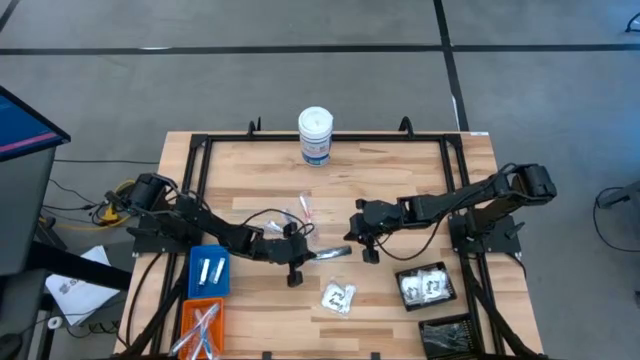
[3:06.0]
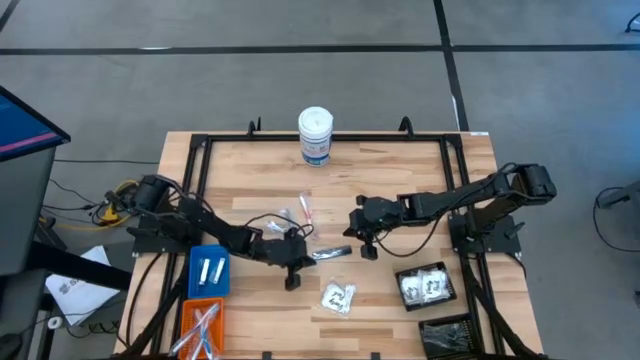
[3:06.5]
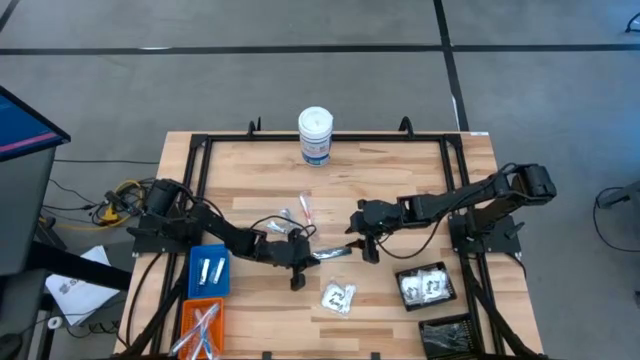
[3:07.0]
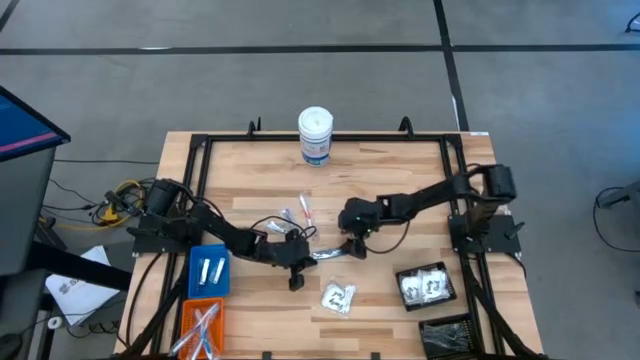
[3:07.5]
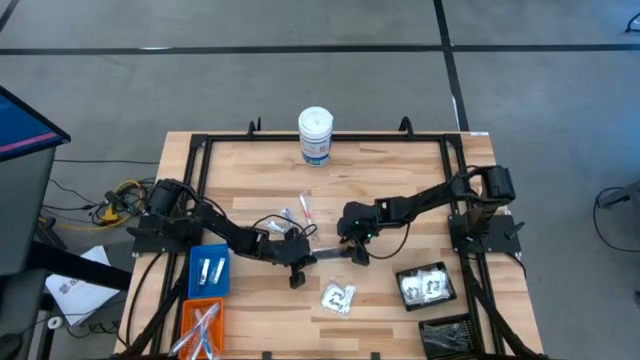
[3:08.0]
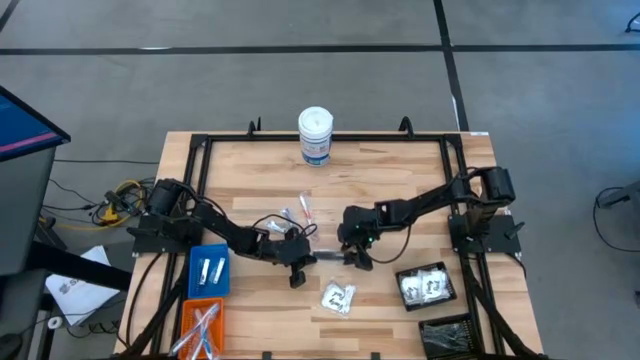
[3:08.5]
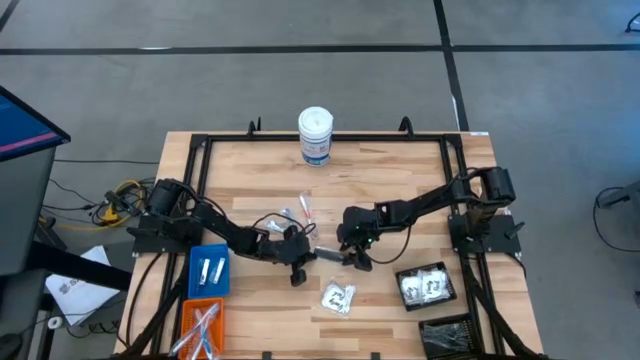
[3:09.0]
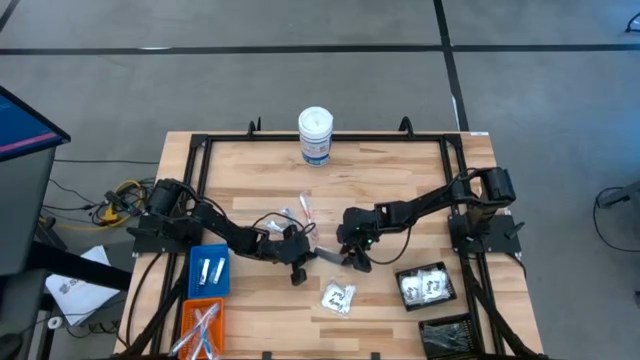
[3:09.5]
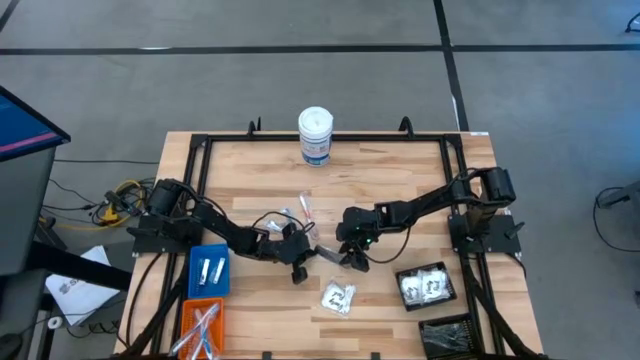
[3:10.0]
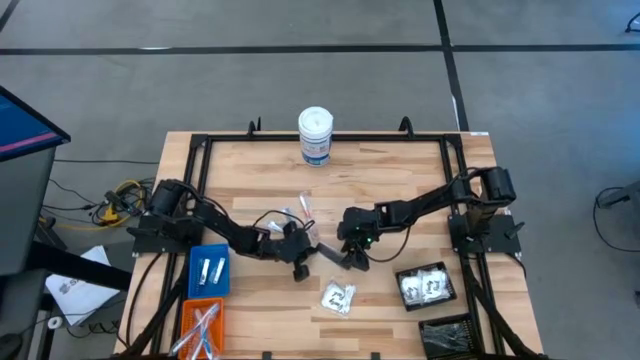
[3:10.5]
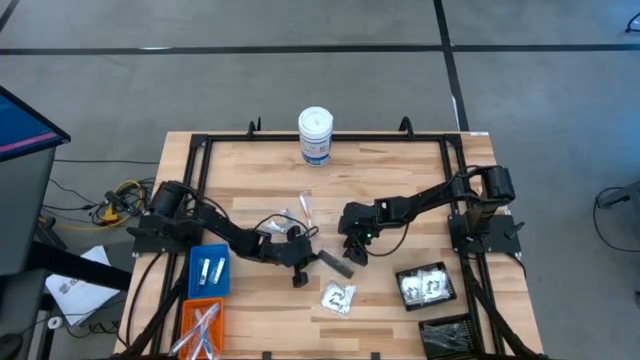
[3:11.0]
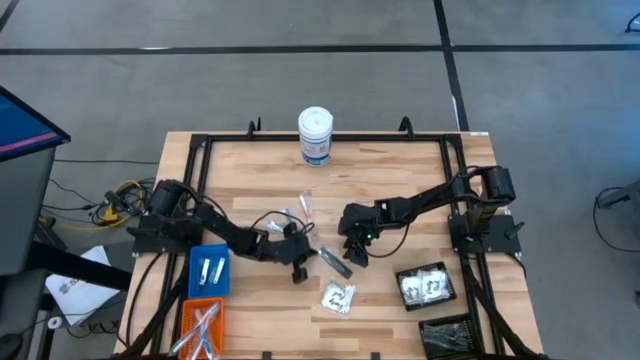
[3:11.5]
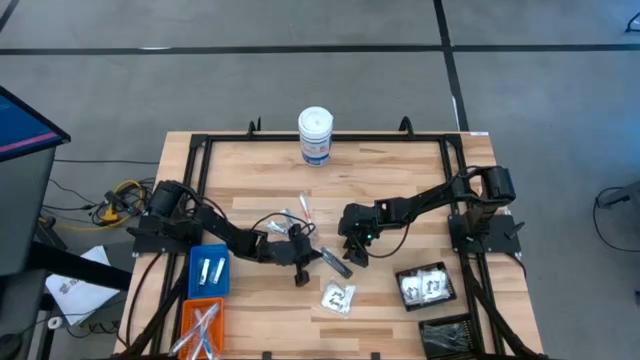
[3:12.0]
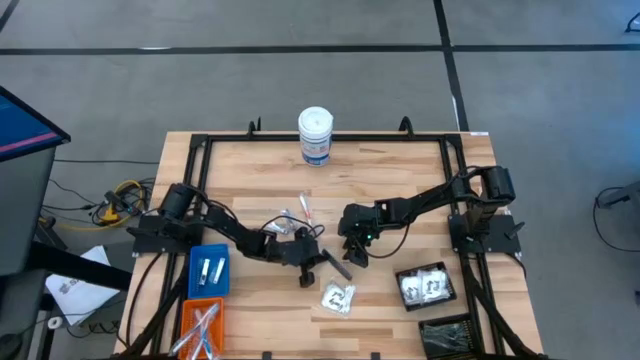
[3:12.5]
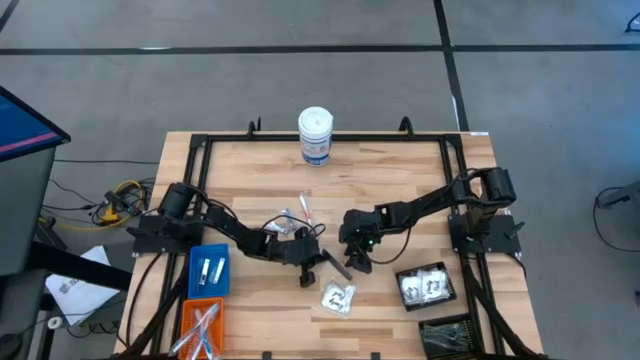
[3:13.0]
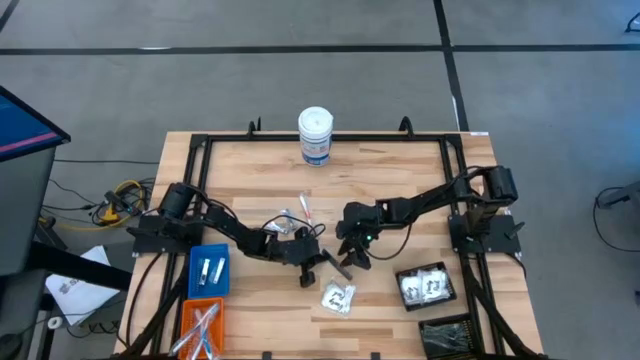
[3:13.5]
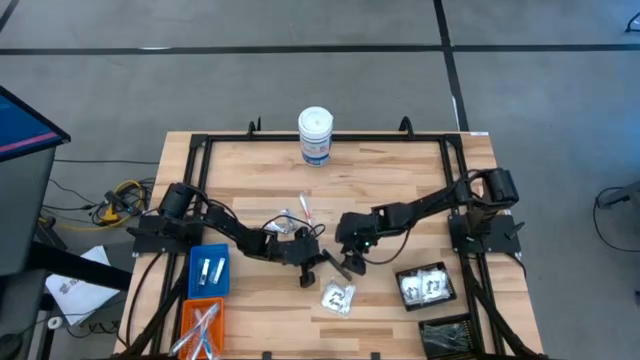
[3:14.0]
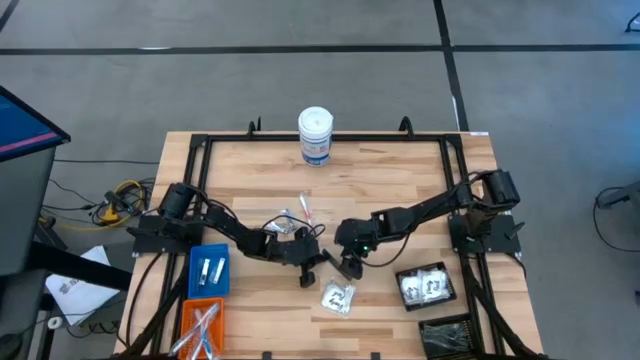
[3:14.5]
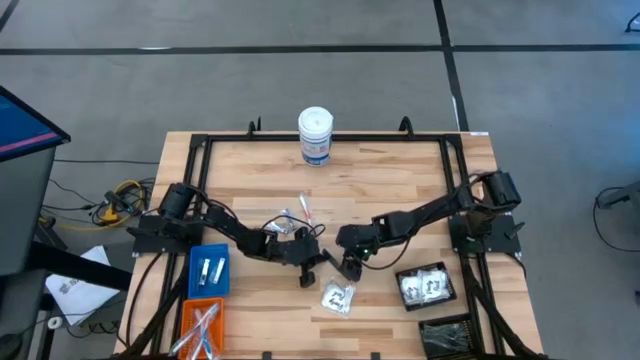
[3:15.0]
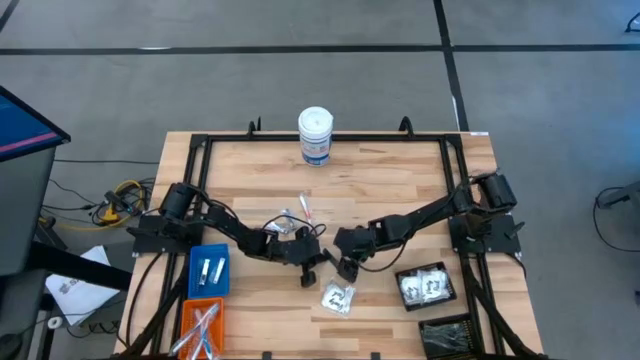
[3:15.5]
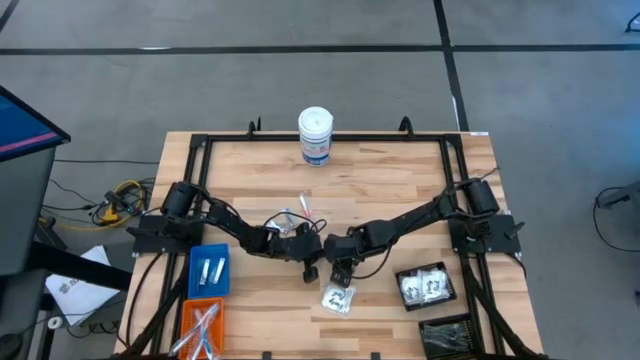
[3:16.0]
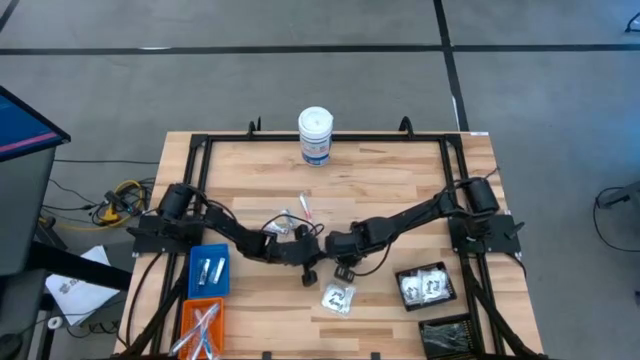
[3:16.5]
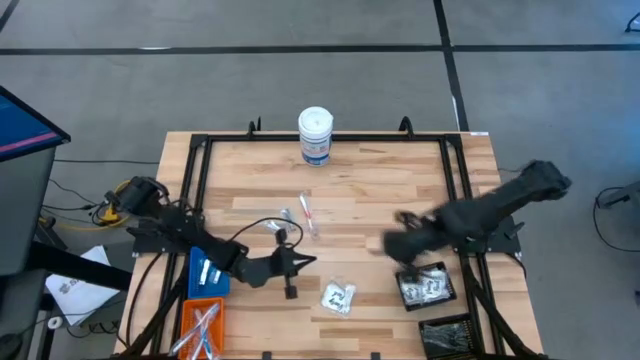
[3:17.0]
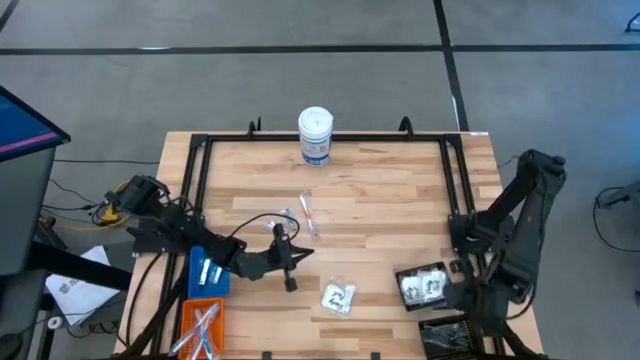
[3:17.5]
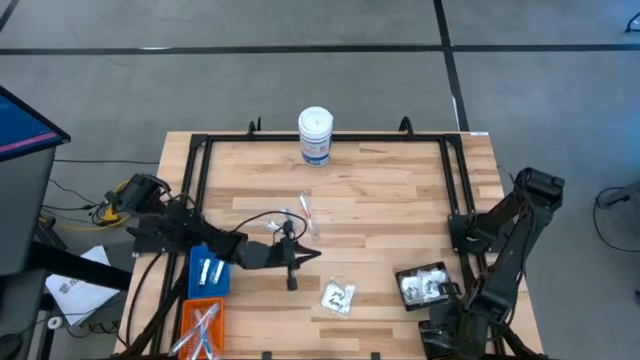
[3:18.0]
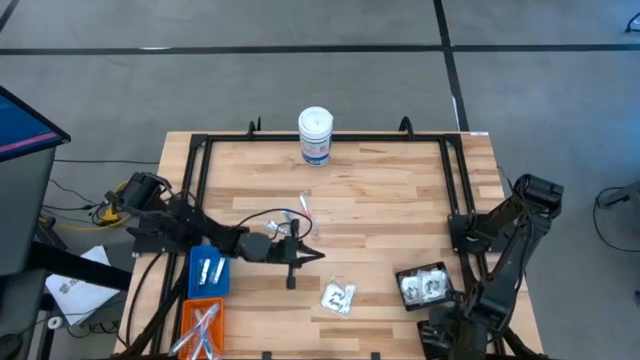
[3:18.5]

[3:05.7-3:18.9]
Task: Pick & Place Travel size toiletries
Put the black comb into the bottom black bin

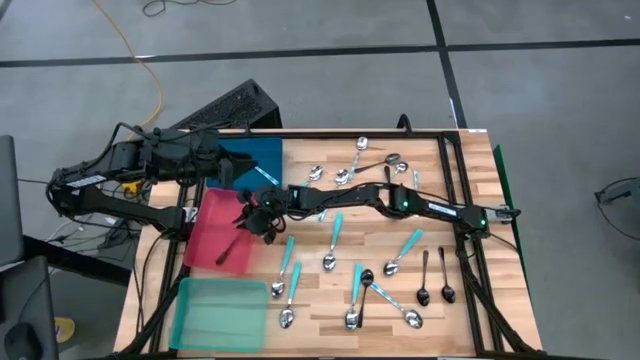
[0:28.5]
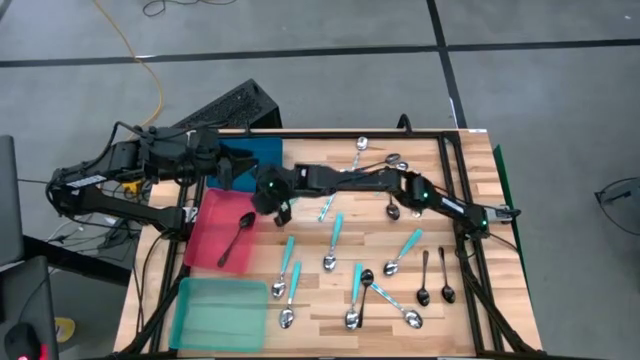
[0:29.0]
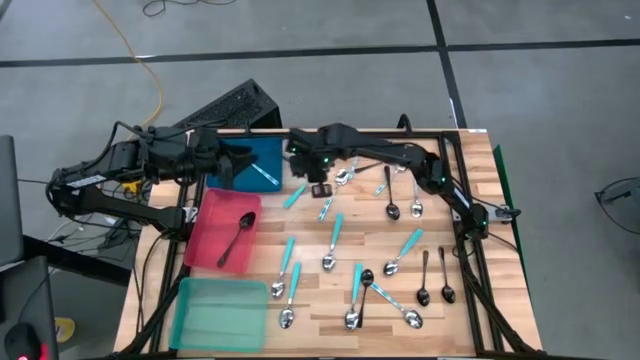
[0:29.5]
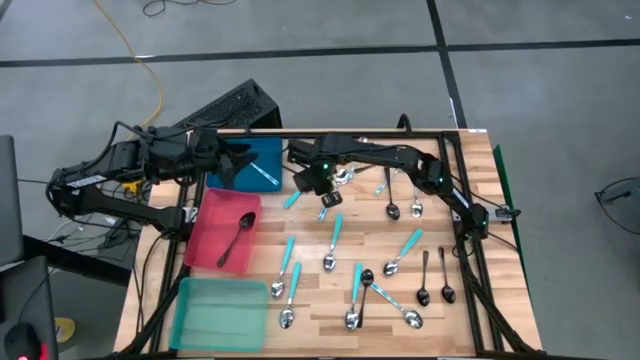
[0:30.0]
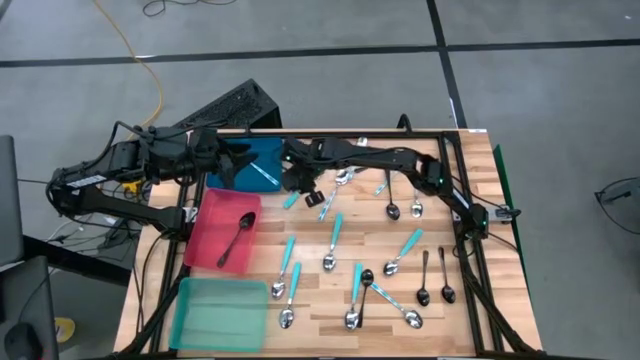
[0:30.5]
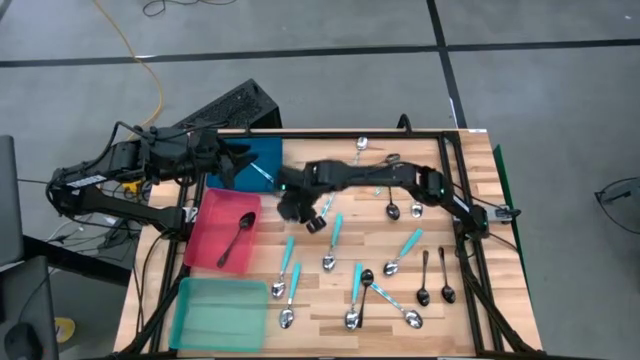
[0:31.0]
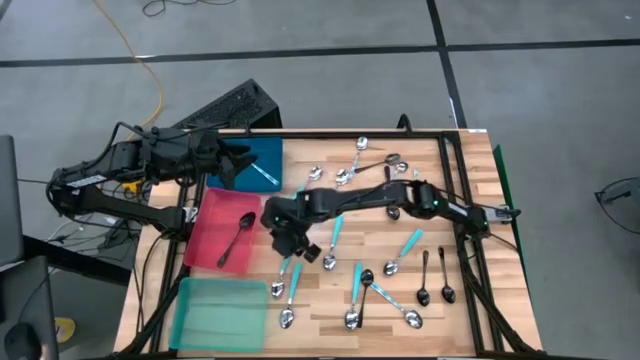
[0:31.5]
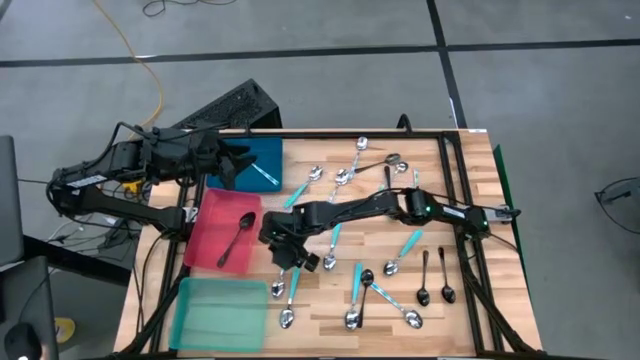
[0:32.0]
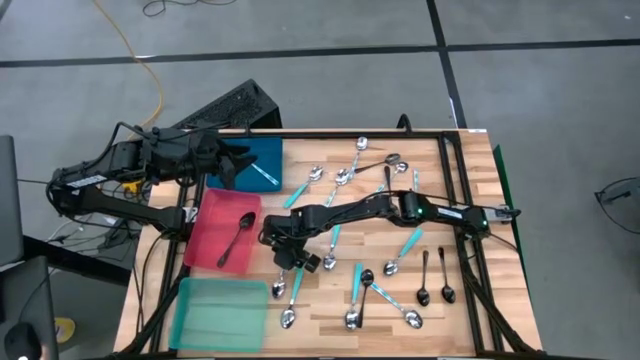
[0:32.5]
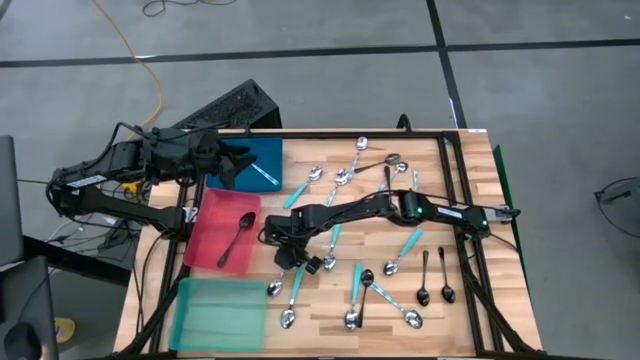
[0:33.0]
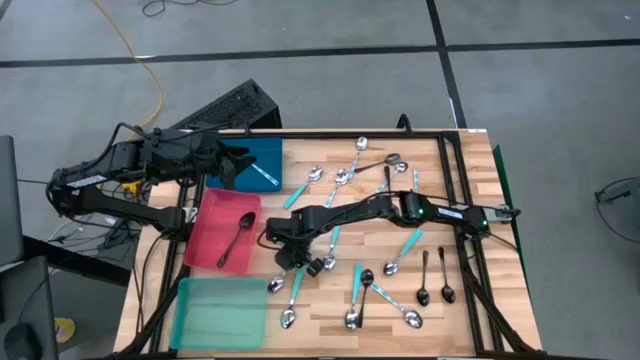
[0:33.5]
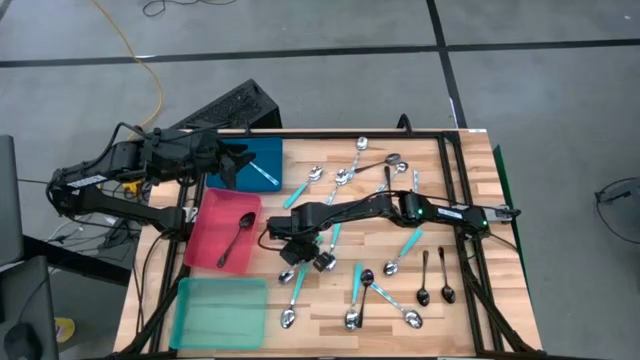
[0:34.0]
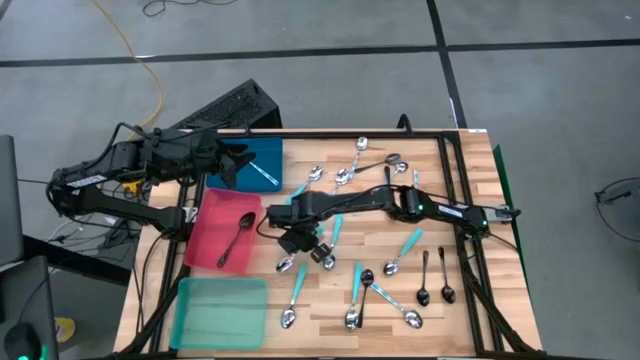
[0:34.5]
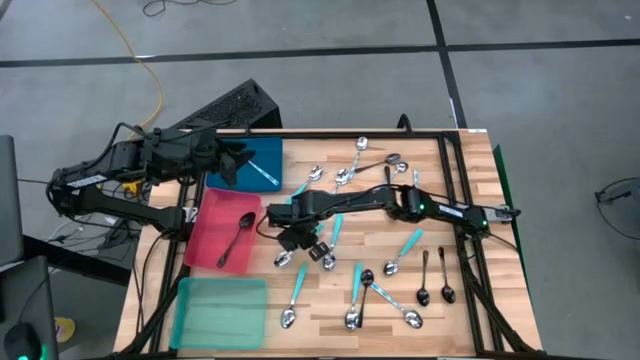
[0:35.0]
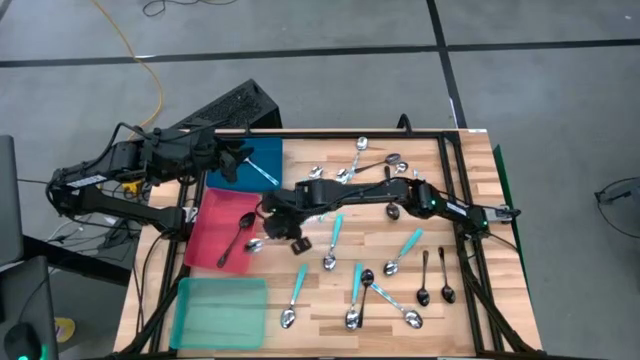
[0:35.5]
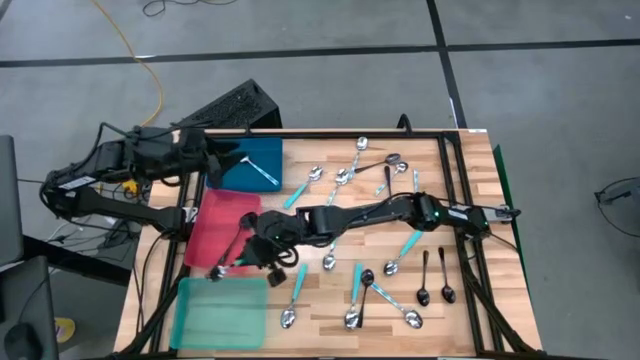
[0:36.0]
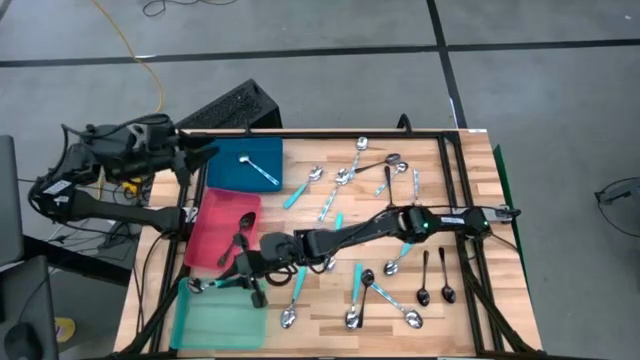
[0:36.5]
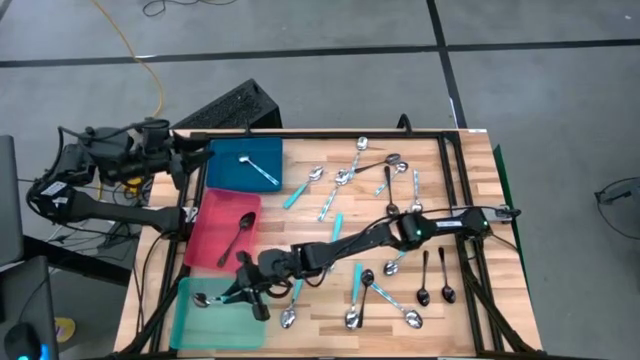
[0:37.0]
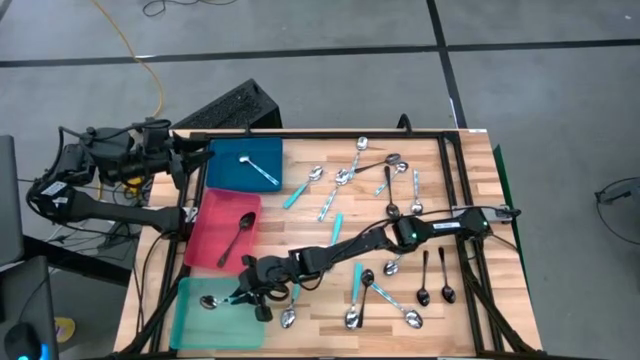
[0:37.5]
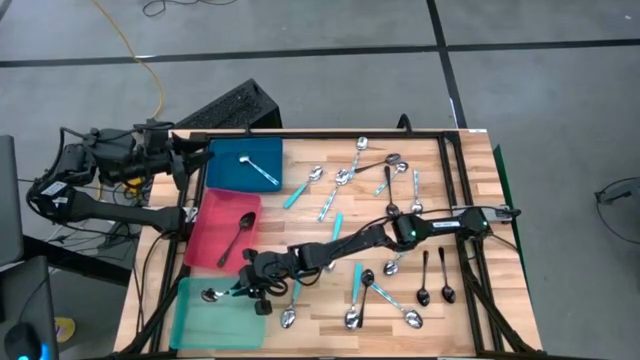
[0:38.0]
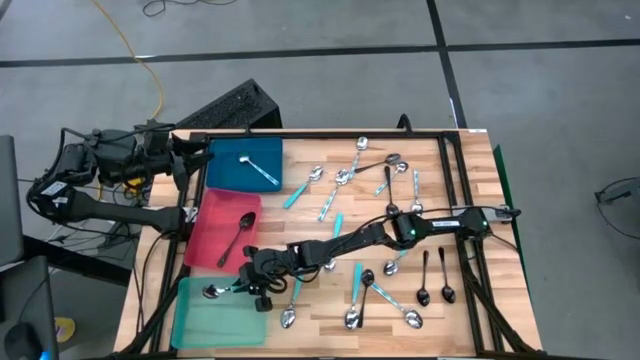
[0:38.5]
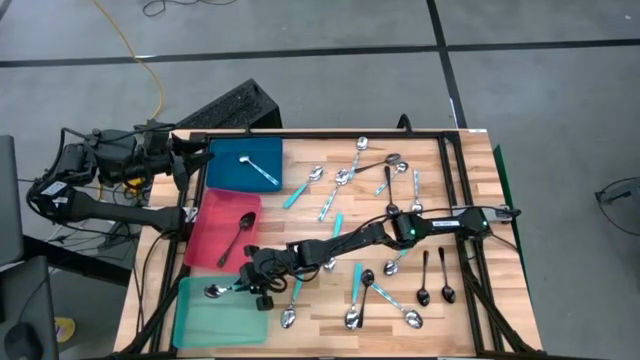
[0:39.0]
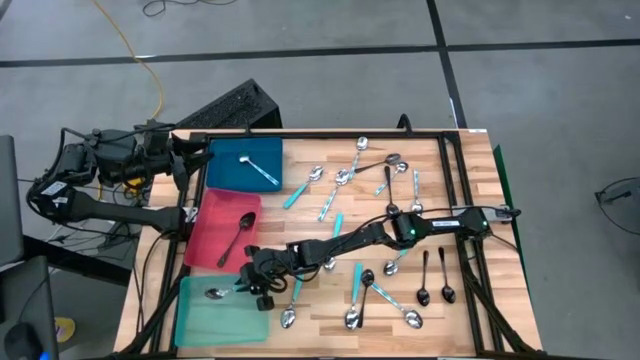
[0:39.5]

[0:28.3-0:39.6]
Task: Sort silverware by color (type)
Put the light blue spoon into the light blue bin
